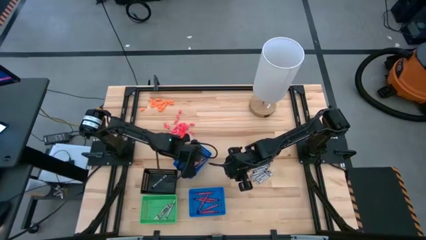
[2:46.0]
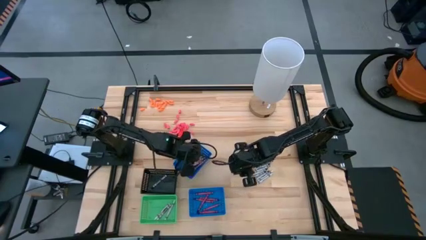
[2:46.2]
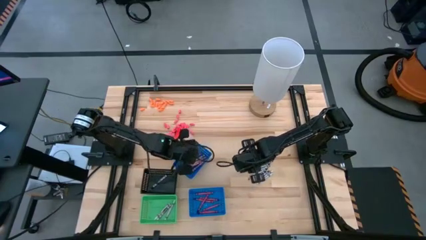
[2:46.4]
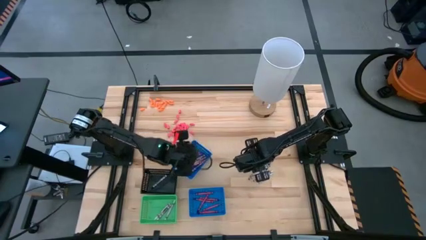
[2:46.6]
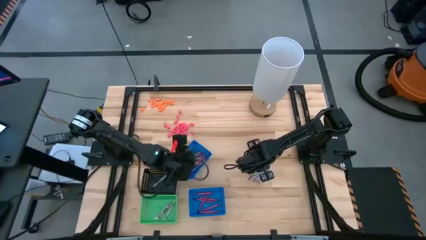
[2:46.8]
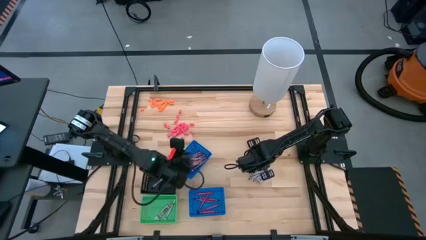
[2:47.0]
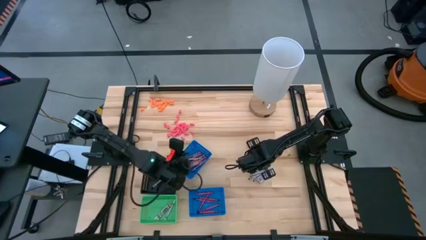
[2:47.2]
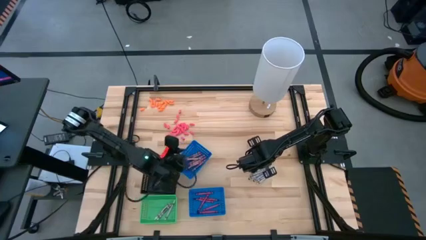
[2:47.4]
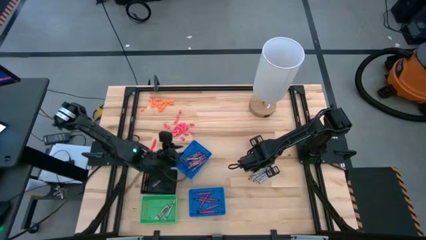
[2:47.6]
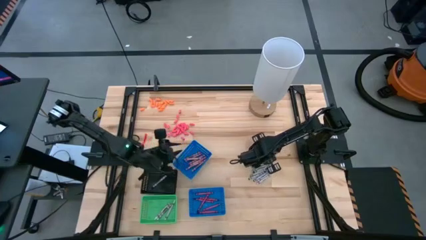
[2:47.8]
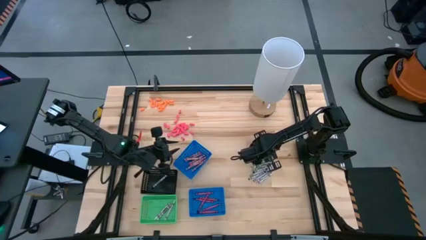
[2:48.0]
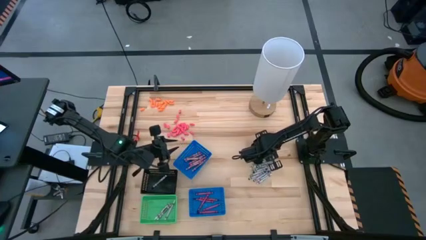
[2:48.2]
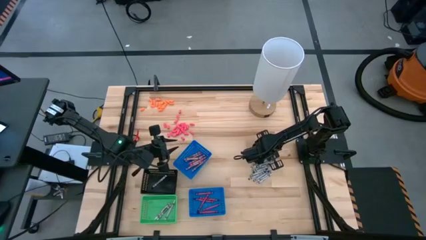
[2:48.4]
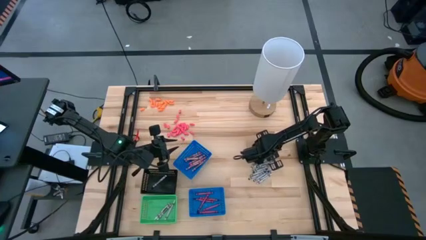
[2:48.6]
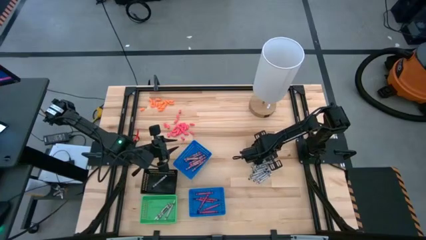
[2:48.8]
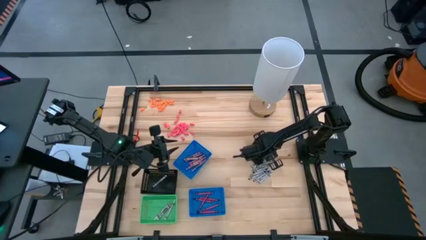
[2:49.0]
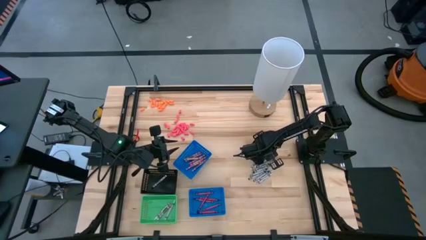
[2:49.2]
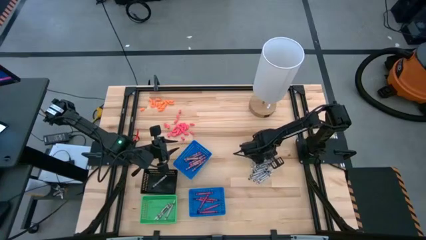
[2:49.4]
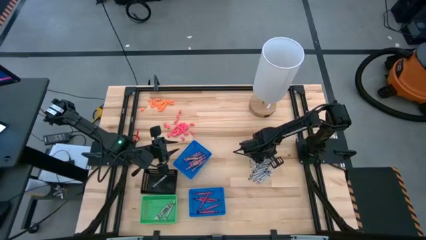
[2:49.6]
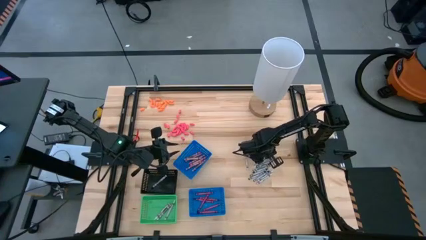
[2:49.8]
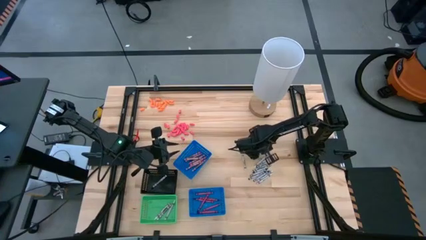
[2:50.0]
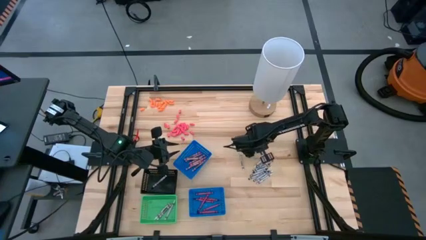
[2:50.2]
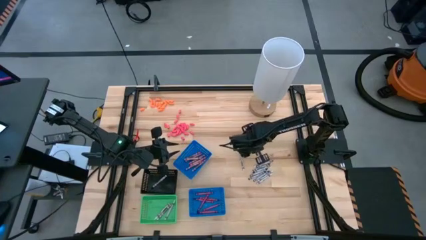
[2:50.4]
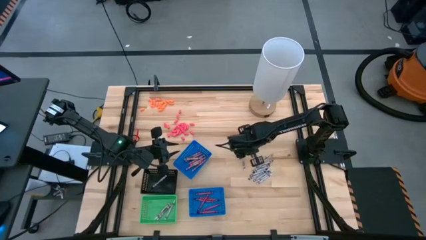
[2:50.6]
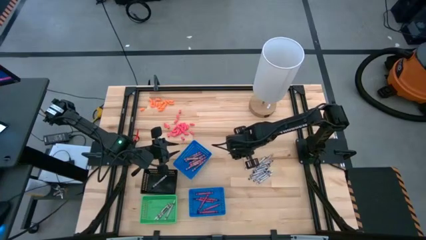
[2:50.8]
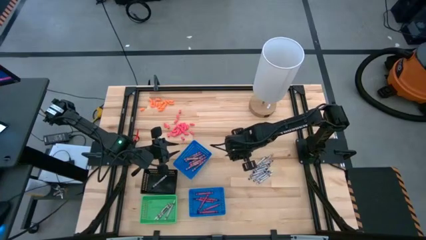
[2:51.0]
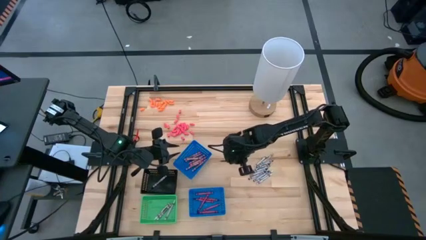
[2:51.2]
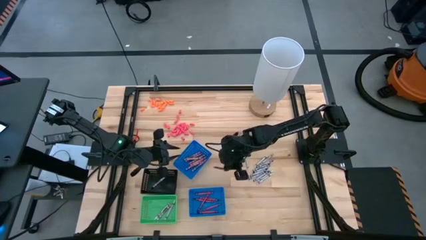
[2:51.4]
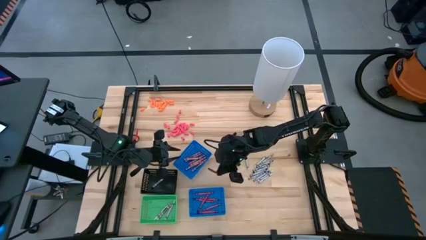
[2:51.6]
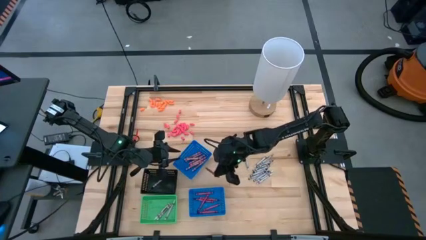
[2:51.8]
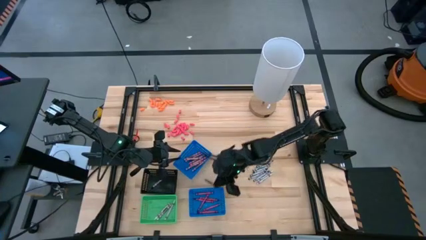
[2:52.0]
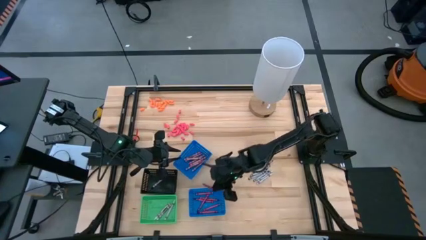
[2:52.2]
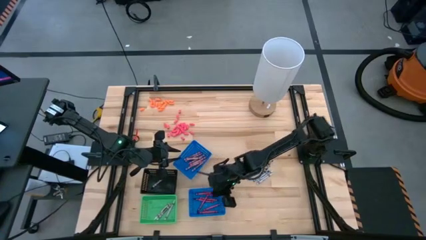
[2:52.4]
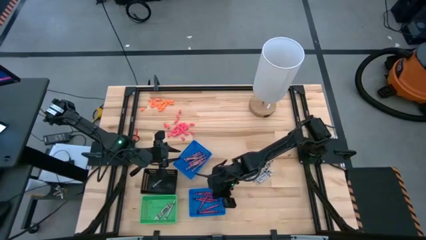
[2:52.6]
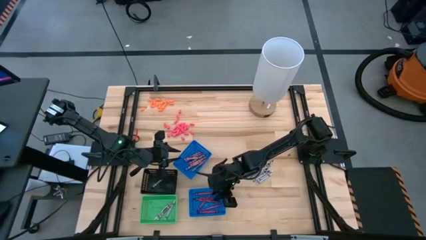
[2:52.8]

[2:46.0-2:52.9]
Task: Sort crayons
Put the violet crayon into the bottom blue bin

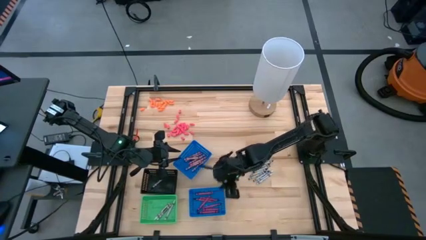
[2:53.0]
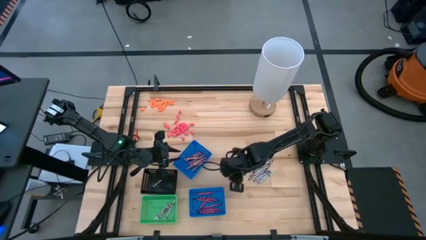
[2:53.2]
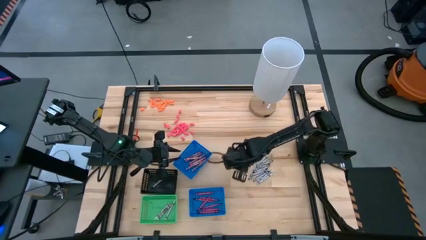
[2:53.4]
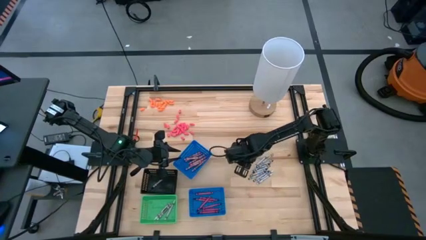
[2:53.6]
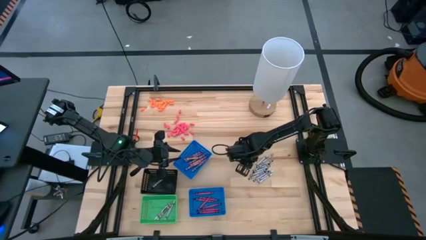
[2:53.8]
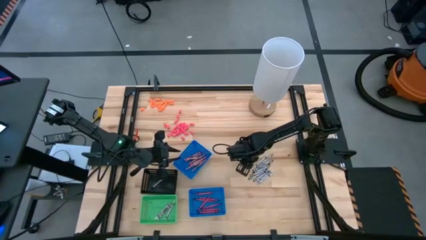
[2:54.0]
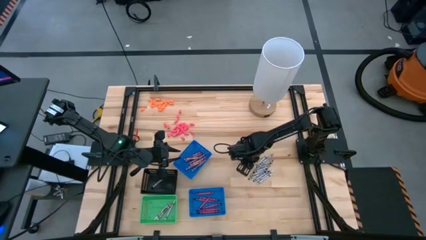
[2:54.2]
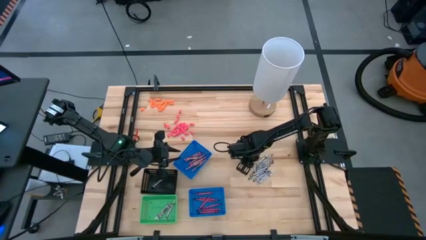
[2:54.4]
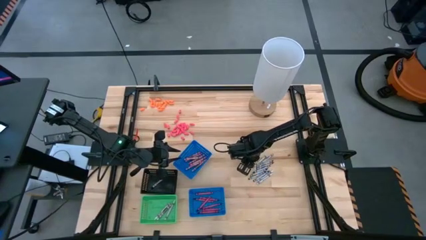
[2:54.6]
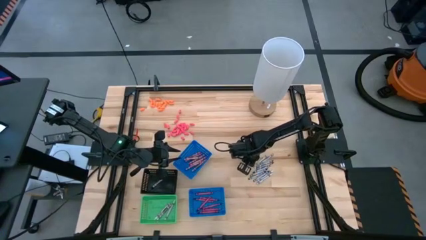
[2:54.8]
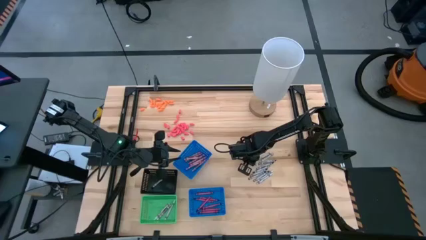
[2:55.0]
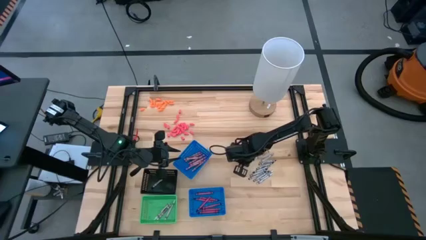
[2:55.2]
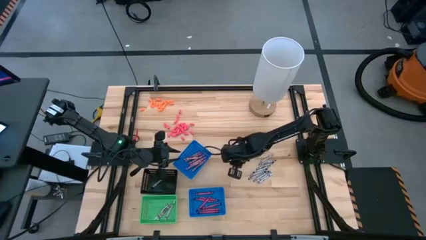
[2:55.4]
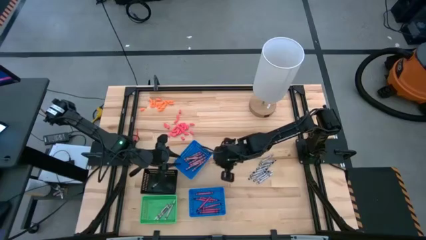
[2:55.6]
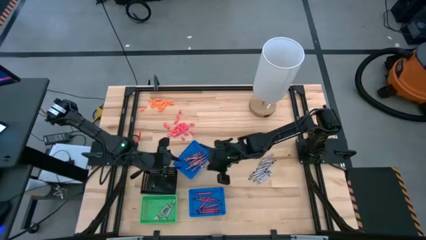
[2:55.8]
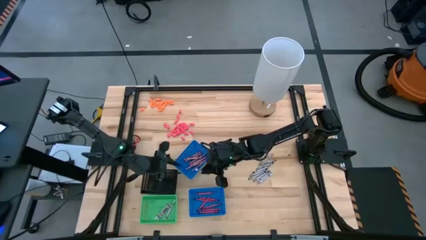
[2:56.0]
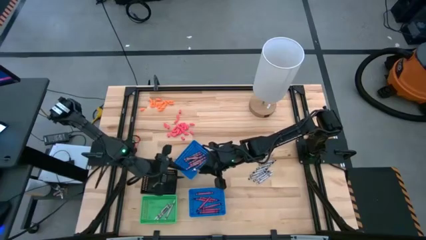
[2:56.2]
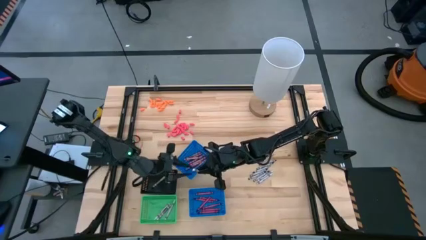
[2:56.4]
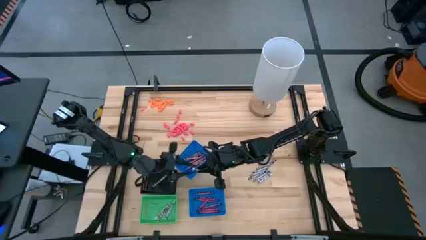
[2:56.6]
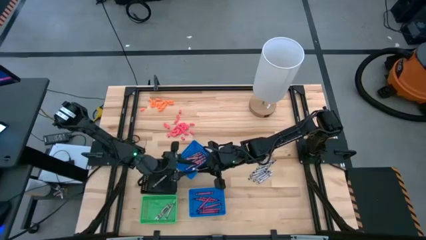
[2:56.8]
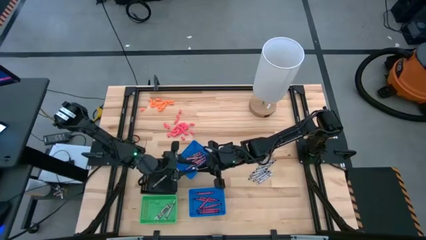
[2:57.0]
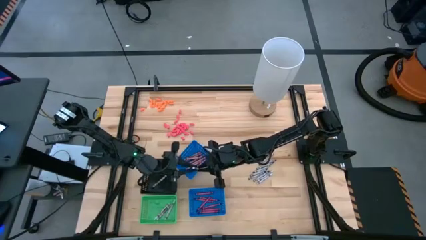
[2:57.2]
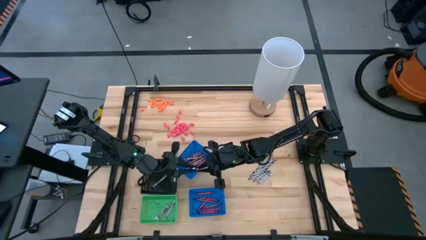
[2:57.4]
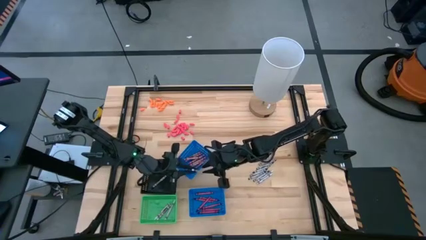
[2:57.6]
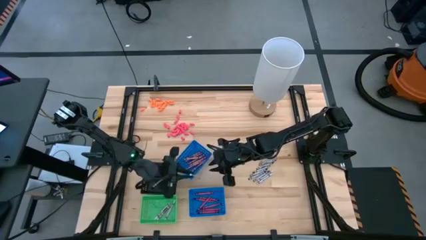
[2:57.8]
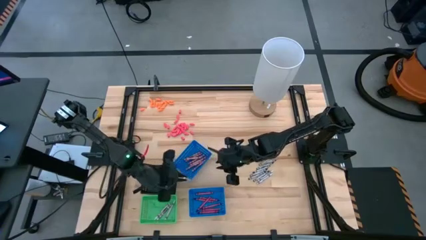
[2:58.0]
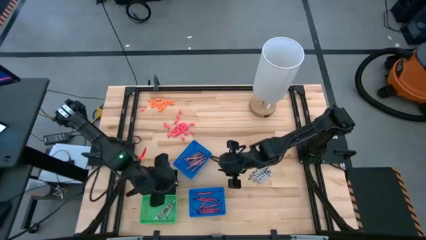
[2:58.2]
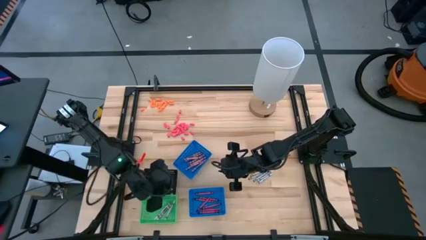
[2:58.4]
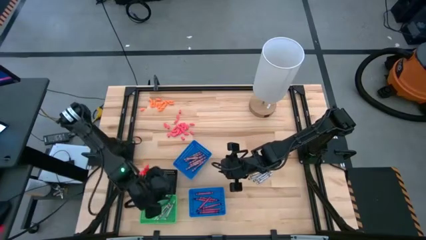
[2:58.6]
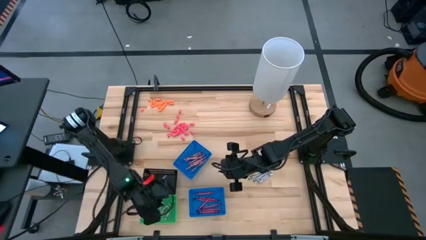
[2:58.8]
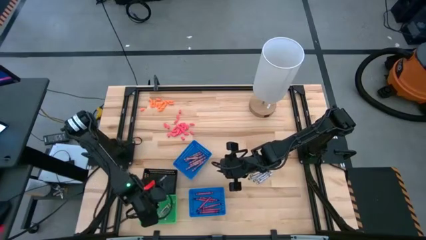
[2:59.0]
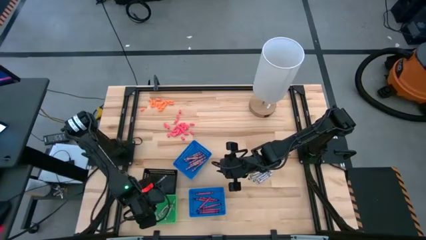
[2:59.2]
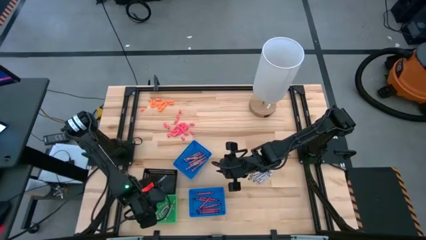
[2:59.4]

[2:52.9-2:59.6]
Put the white crayon into the green bin
